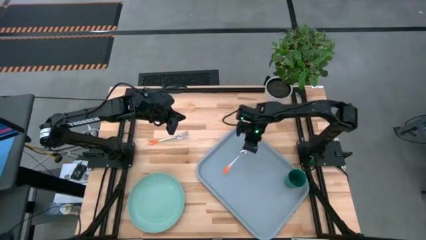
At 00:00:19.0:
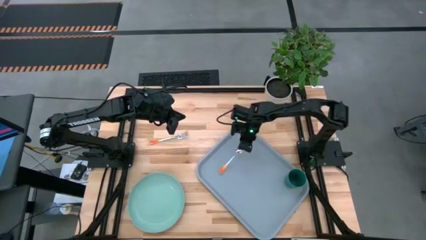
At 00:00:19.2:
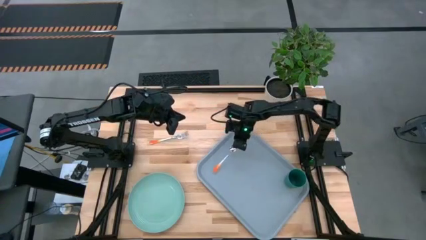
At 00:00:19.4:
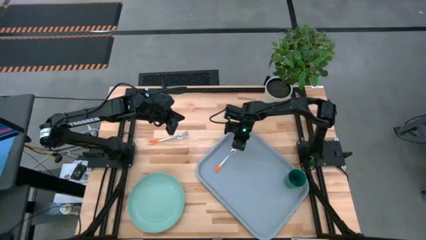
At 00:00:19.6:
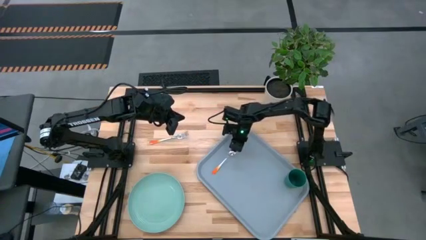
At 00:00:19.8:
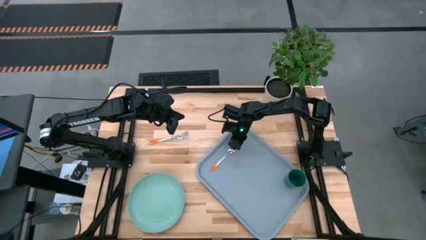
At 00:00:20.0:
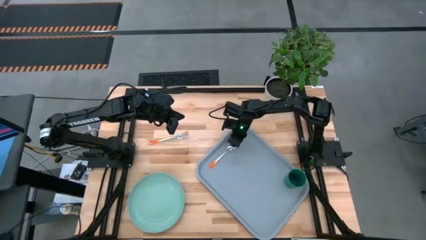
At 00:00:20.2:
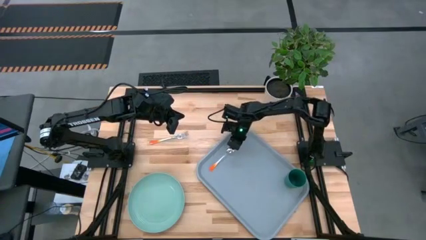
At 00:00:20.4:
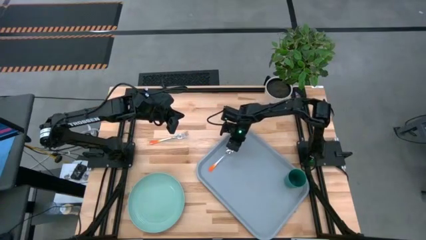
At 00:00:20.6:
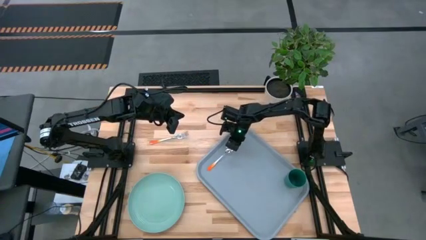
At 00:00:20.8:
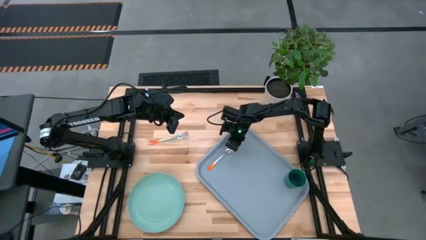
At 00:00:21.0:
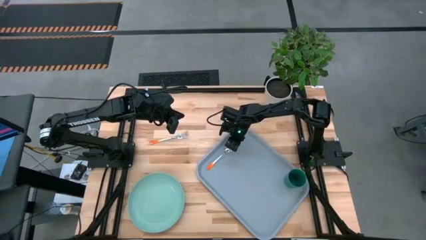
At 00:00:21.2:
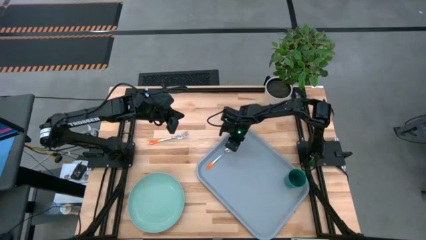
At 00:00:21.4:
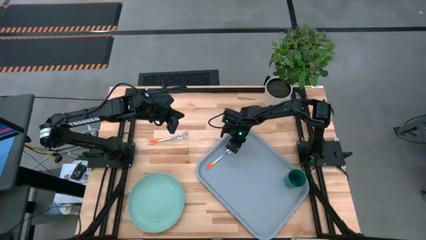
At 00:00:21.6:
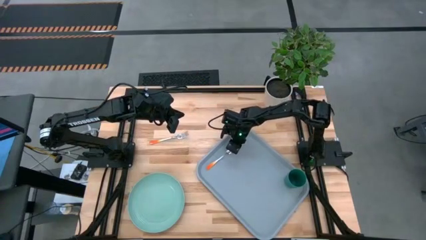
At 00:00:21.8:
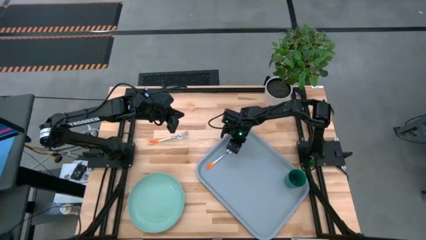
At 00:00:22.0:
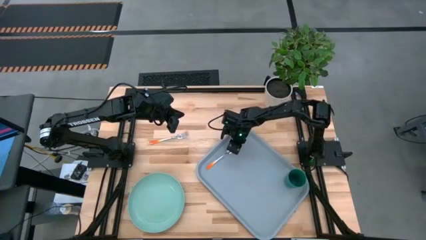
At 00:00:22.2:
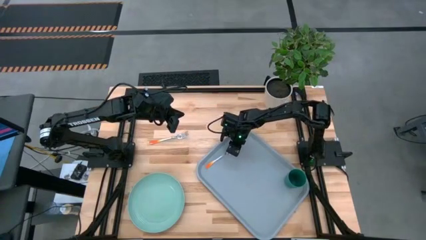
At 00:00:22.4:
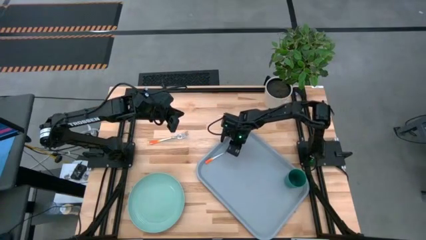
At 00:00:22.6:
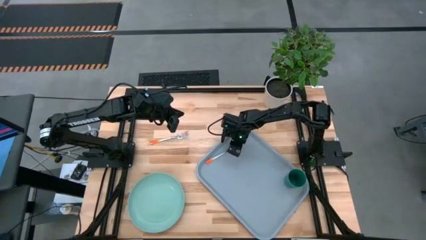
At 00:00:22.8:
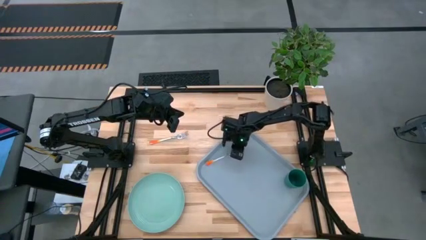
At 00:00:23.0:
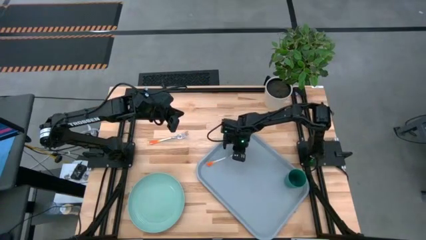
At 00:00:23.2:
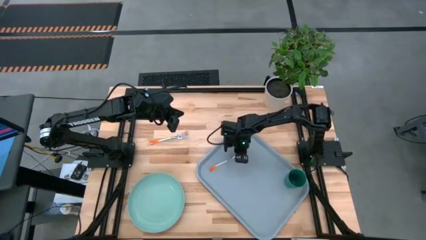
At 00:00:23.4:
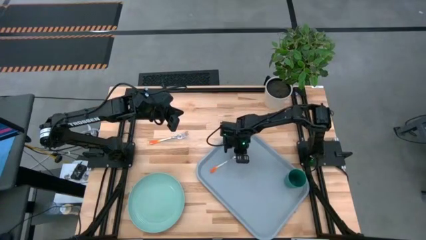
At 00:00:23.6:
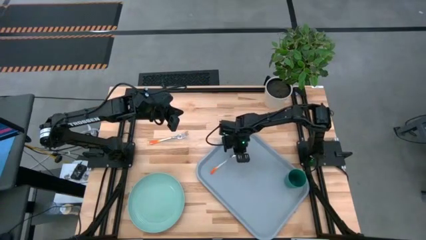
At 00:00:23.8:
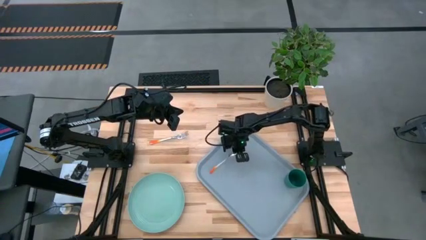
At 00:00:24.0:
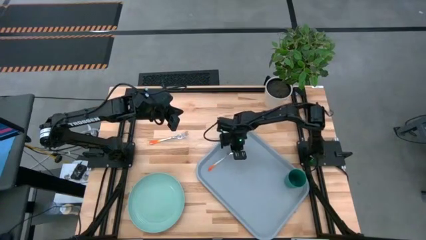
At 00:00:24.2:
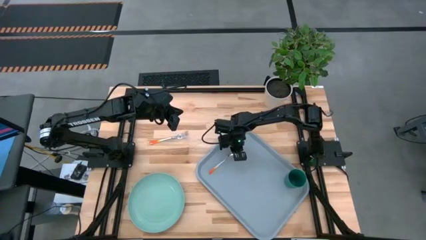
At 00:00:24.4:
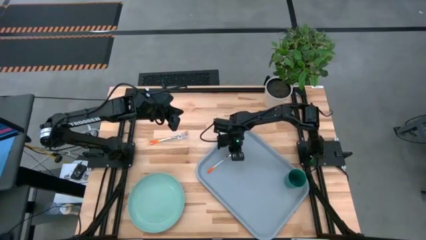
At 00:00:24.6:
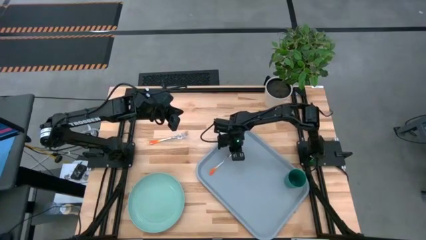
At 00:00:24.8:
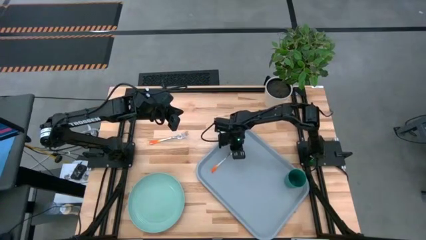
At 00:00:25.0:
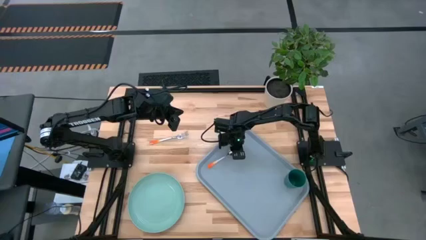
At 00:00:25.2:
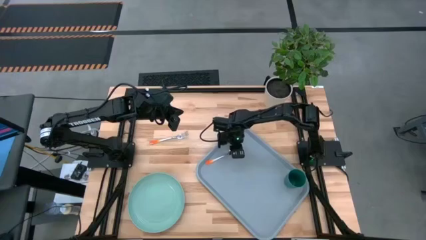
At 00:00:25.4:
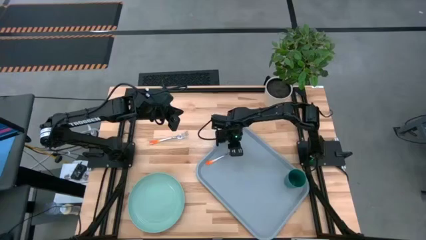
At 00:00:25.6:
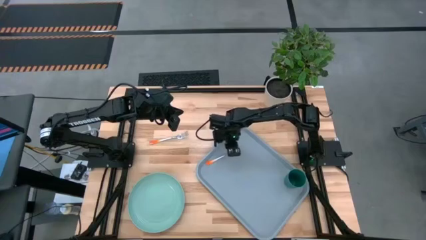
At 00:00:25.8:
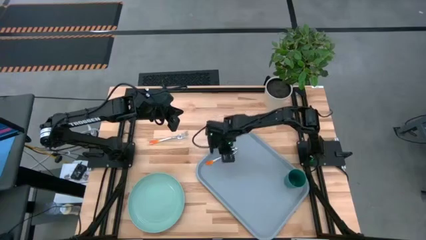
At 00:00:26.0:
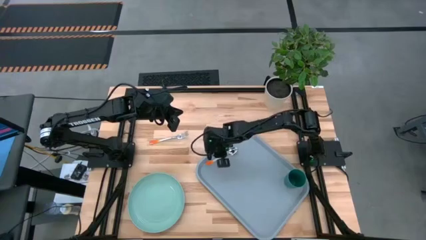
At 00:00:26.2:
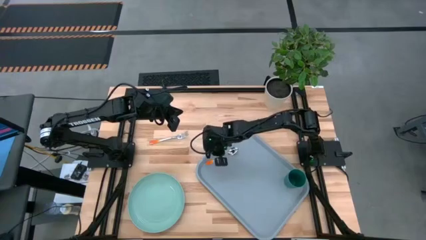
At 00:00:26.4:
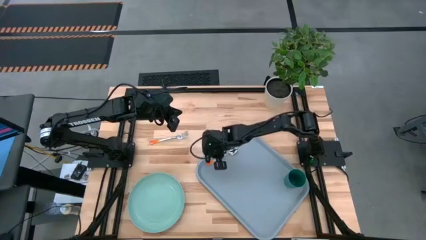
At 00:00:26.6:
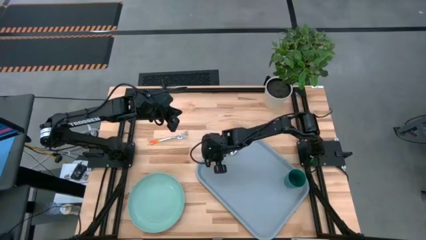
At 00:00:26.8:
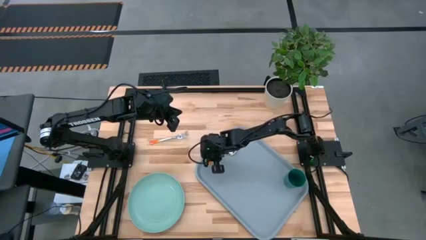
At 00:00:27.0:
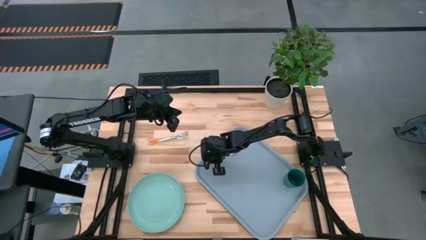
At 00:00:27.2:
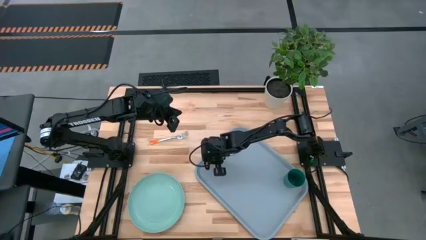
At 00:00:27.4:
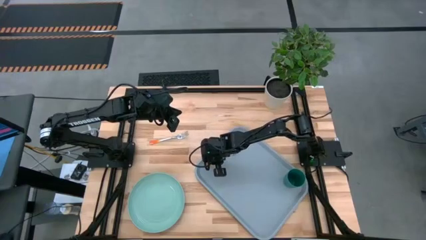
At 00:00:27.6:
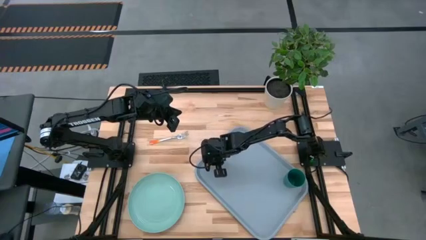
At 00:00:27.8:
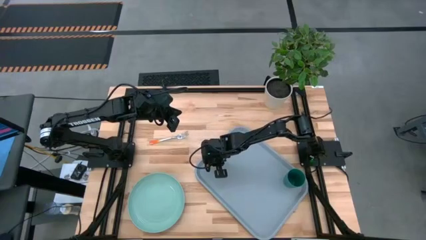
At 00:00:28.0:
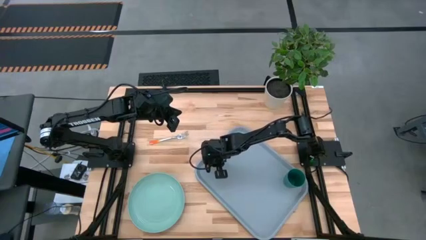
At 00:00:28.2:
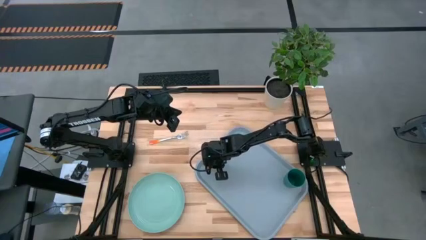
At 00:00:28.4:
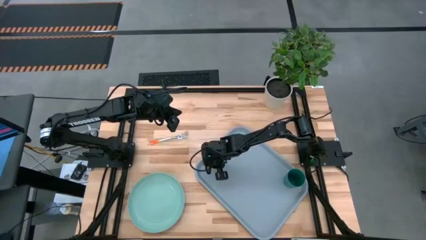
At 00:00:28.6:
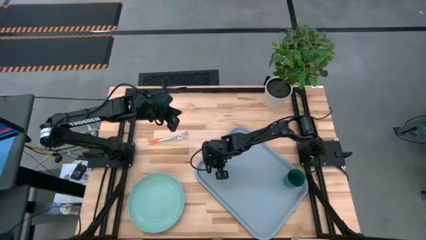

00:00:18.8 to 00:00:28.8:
Task: Pick and place plate/cup/fork/spoon on tray
Put the orange spoon on the blue tray

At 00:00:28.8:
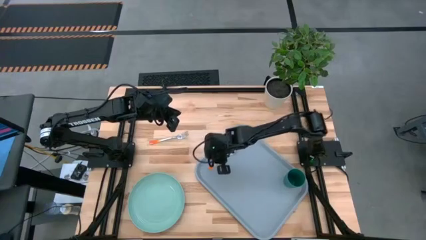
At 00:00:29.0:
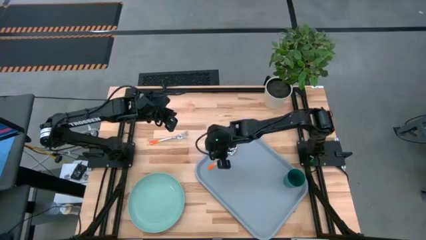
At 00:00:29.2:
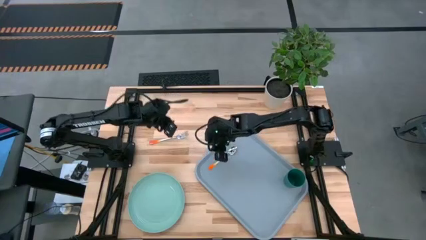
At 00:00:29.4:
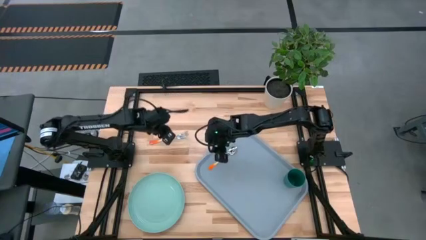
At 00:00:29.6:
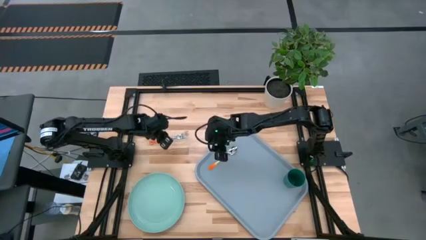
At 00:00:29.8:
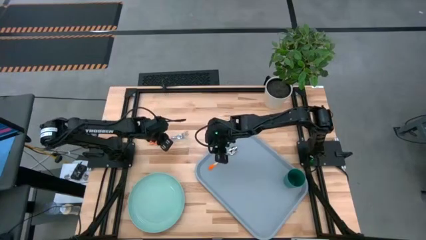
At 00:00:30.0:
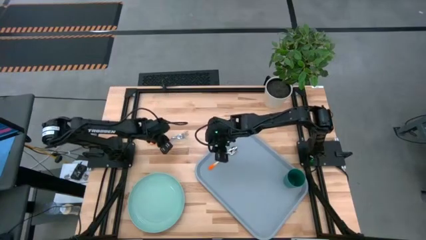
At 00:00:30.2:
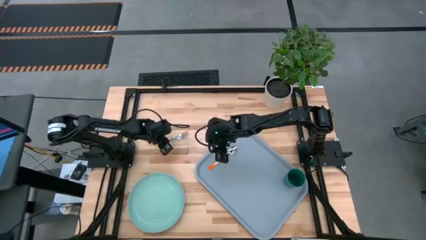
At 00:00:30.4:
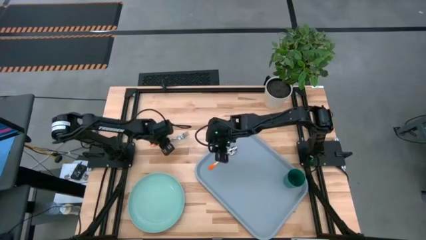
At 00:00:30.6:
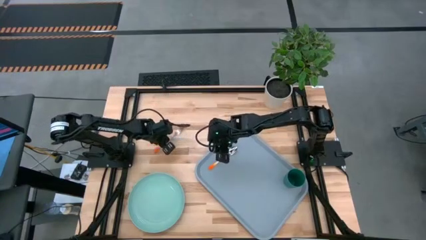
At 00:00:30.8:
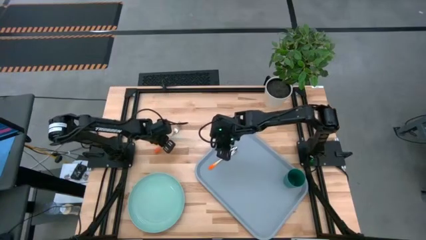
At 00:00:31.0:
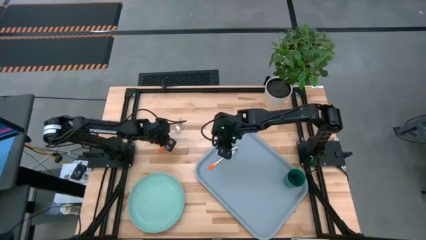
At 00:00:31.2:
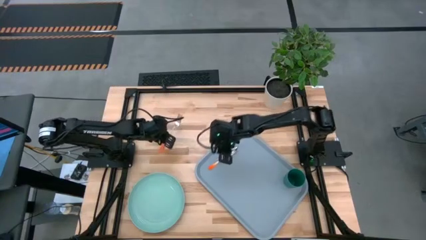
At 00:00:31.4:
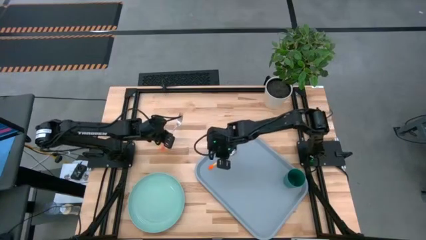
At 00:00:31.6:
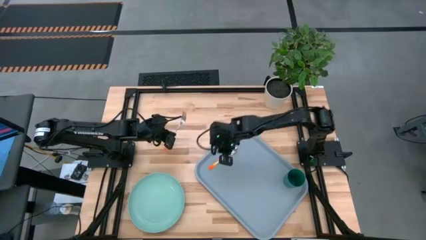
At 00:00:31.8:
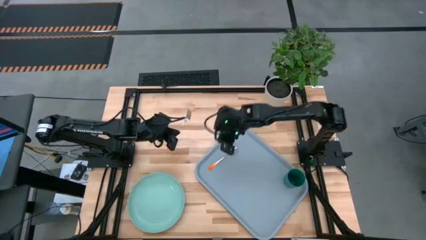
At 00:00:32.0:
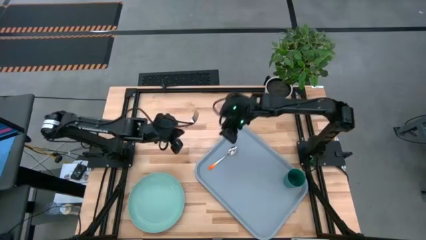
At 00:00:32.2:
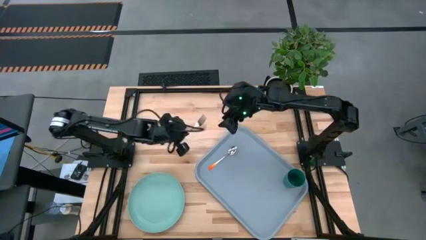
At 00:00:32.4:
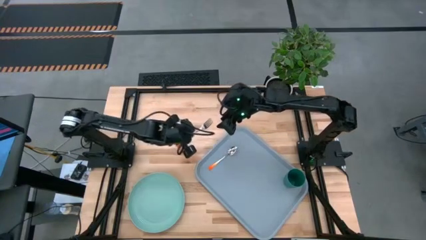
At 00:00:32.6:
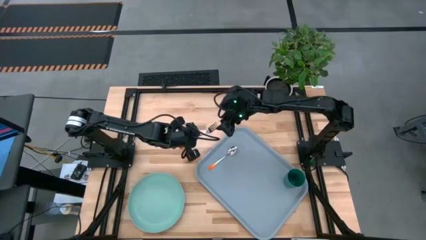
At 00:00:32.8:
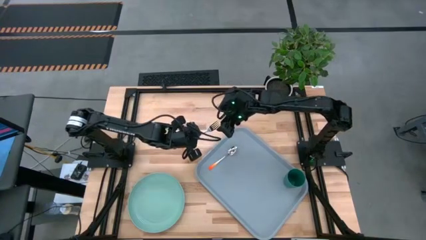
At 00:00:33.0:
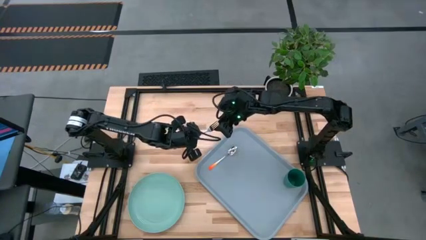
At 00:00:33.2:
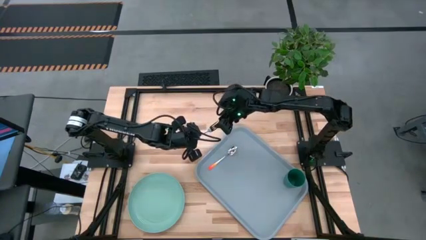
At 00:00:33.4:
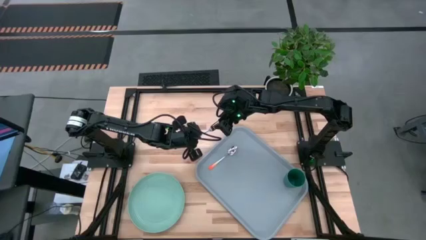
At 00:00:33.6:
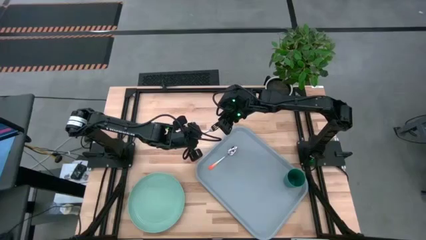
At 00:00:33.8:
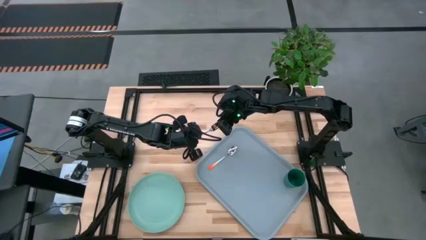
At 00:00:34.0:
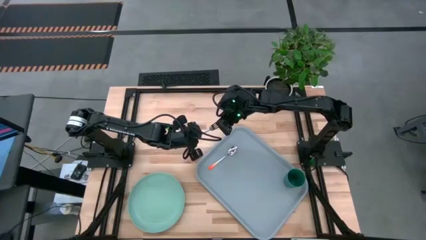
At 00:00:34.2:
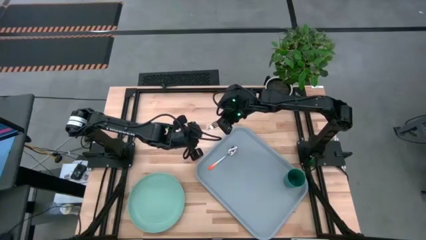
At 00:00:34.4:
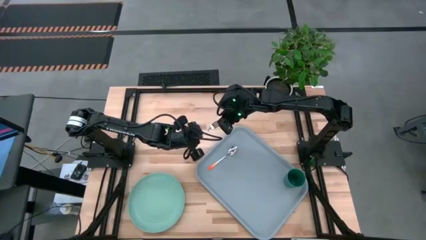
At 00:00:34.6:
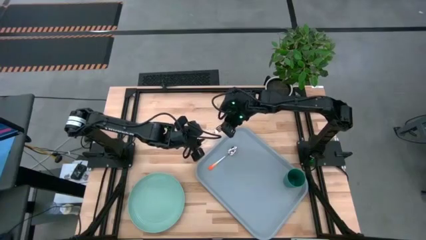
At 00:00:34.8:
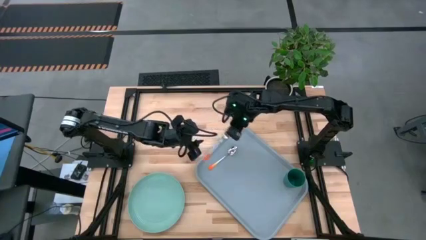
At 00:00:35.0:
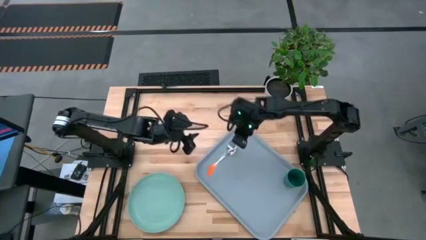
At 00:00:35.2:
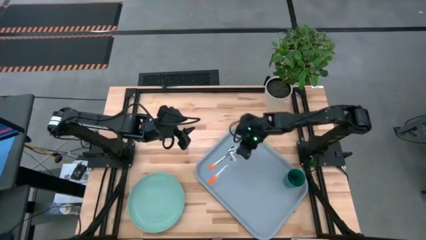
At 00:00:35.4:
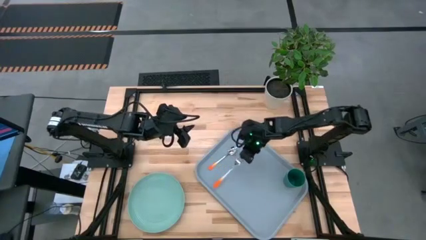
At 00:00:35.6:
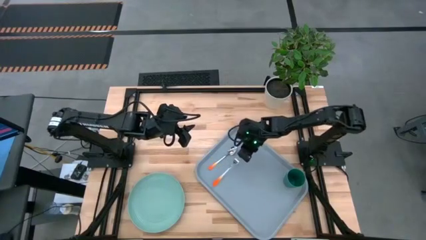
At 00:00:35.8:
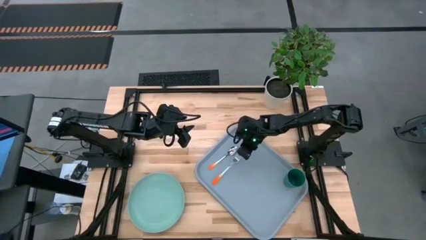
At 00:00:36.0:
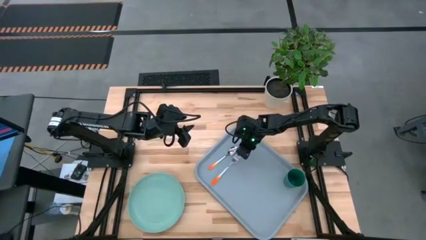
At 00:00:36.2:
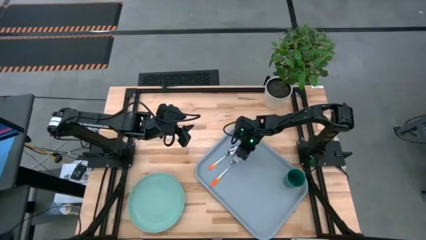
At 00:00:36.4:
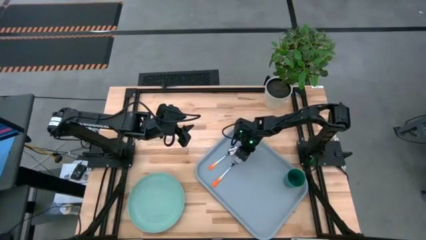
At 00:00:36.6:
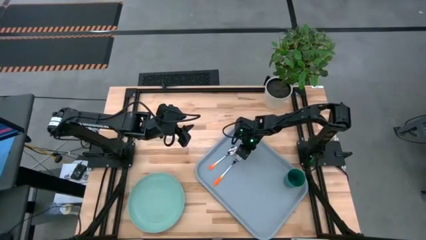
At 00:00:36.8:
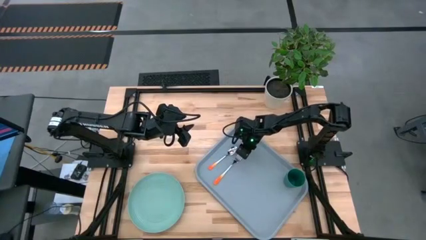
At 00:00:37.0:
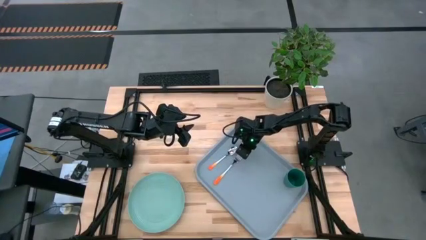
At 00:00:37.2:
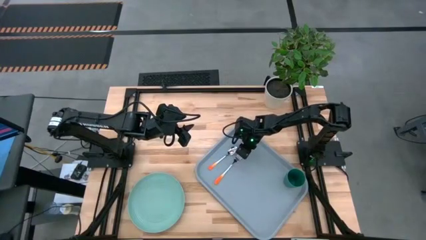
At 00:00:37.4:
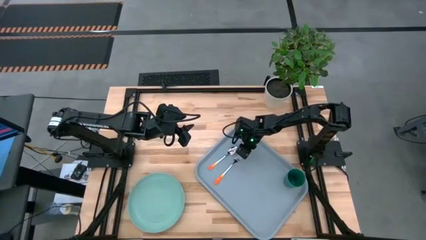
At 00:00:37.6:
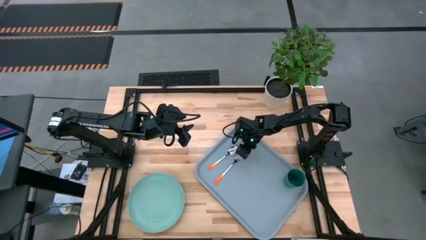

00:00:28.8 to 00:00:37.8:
Put the orange fork on the blue tray to the right of the orange spoon
